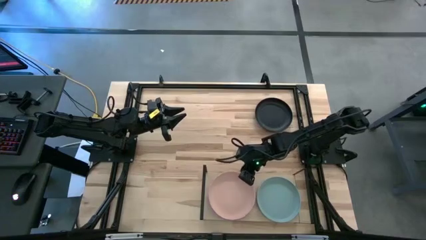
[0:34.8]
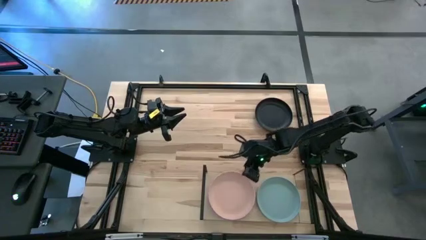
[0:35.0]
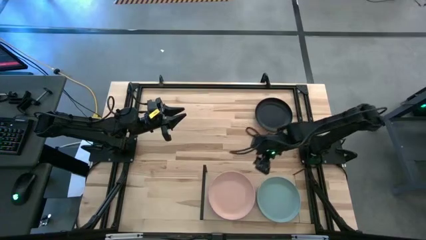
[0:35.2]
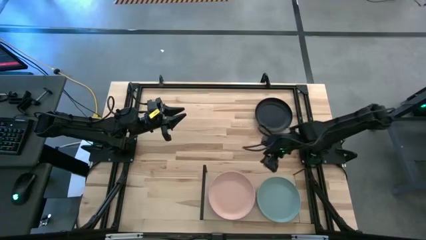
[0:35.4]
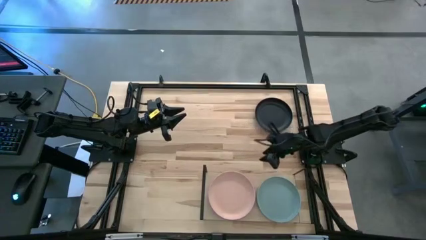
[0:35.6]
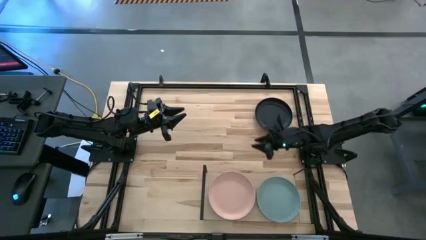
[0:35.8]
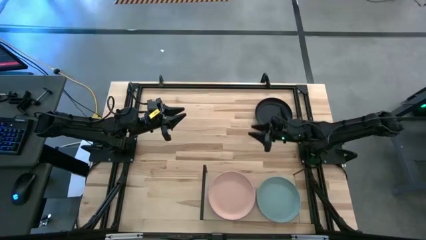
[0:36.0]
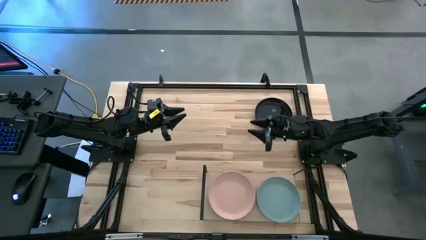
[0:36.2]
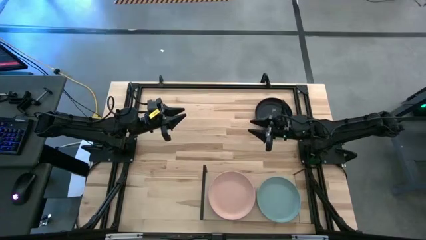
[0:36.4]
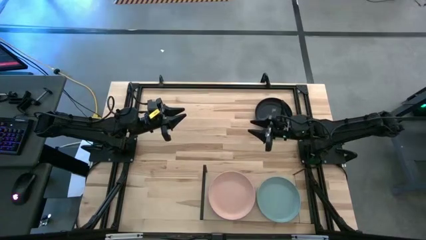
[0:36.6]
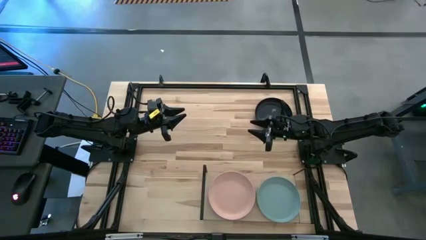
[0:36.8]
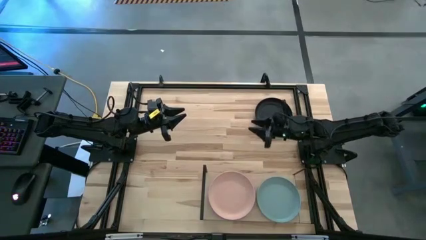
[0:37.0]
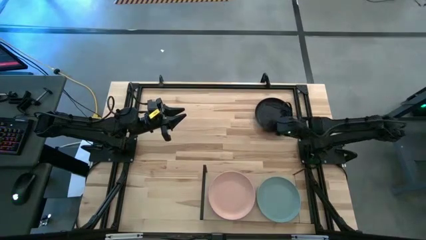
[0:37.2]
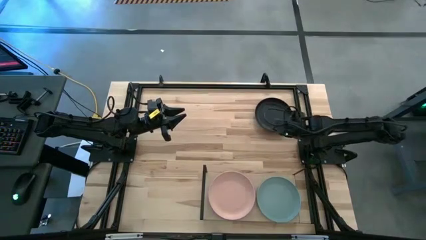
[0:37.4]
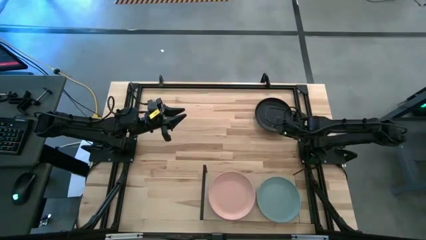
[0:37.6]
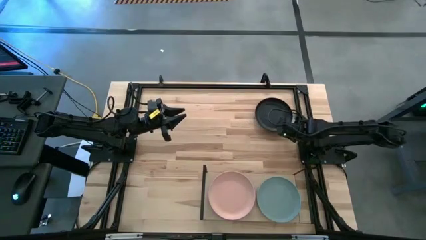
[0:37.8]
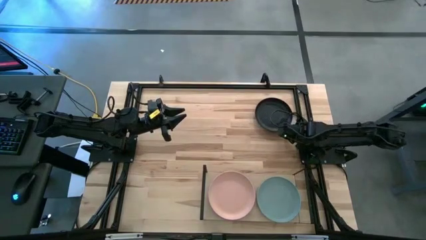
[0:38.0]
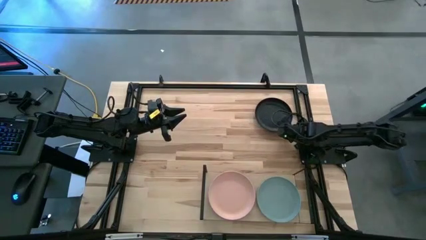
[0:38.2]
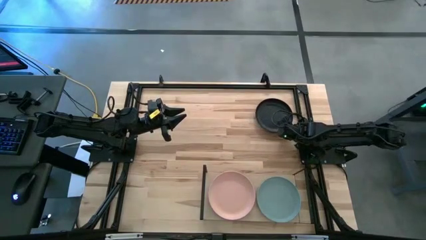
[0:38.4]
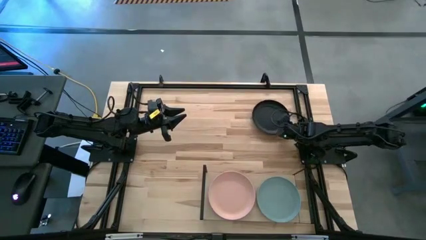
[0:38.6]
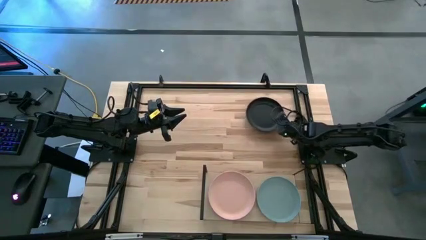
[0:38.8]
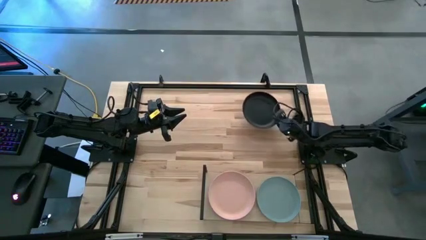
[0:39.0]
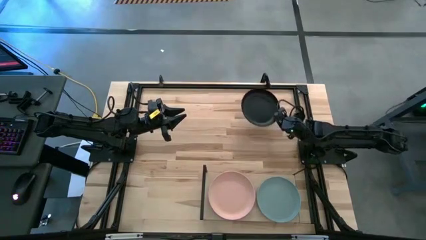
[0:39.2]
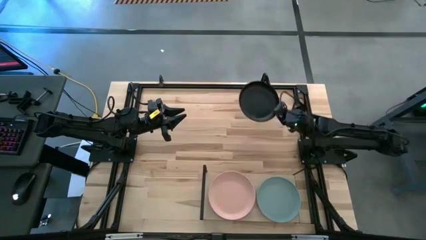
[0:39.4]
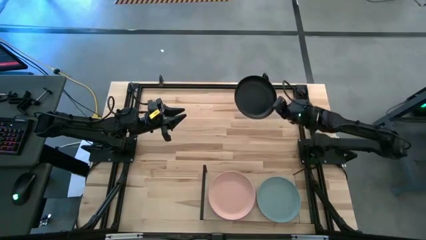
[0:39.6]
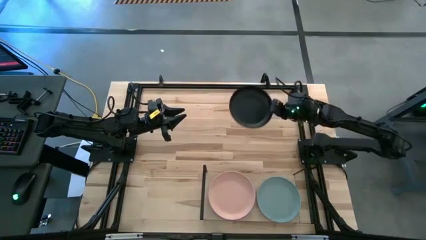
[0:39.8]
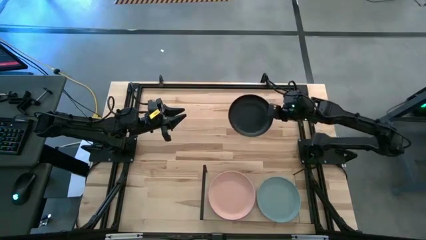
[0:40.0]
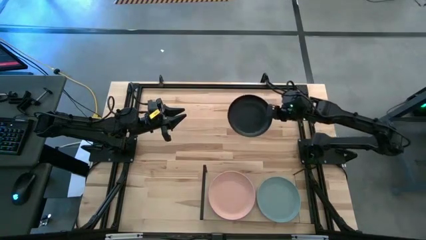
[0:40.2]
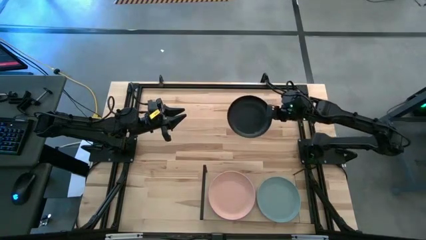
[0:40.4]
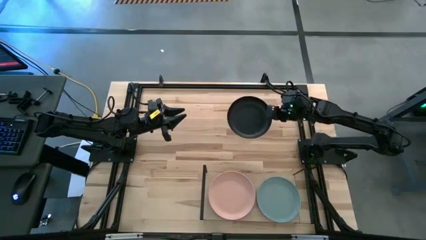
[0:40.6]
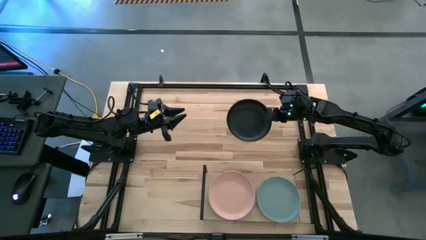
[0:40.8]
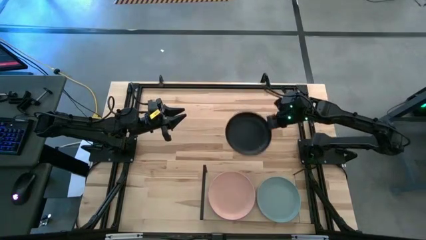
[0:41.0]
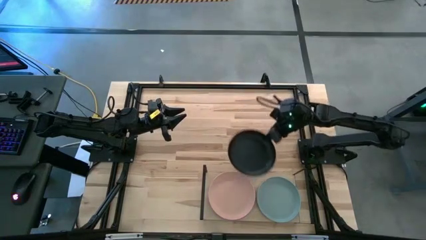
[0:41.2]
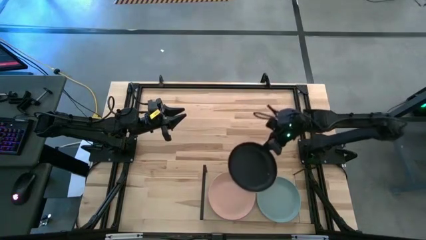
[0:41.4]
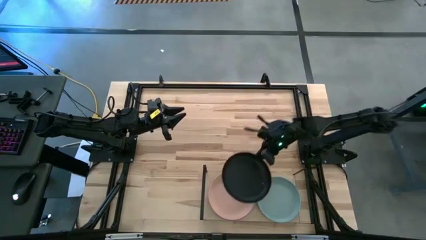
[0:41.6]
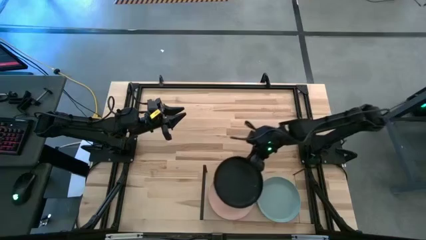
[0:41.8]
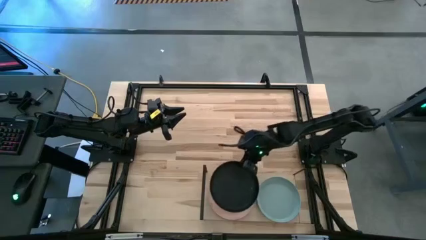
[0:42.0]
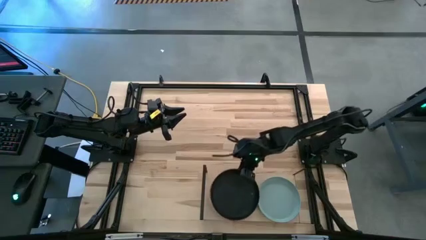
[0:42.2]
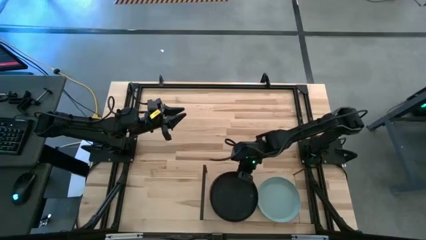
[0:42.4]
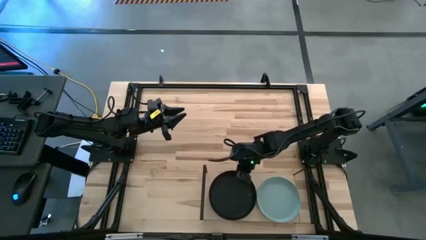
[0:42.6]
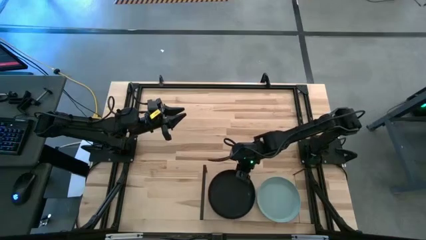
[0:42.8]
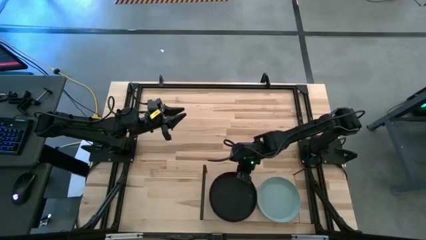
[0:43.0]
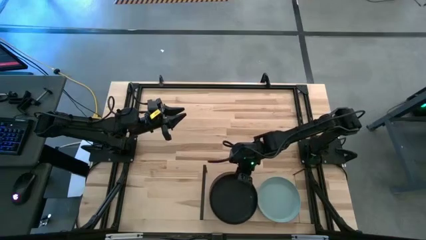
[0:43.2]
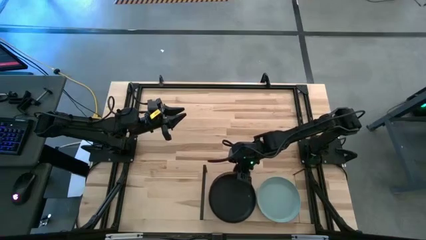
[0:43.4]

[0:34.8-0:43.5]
Task: Place and stack plates onto a shelf
Stack the black plate on the orange plate on the shelf

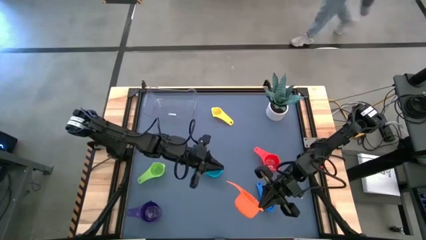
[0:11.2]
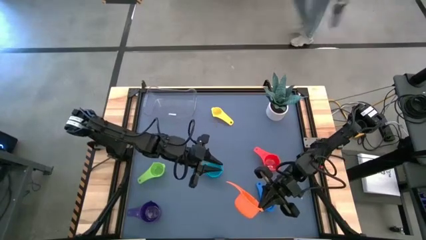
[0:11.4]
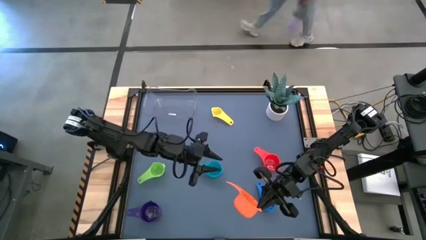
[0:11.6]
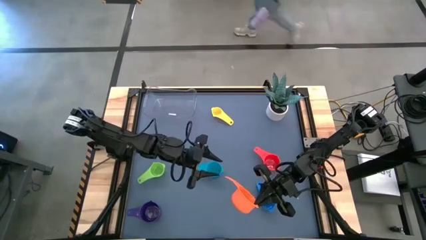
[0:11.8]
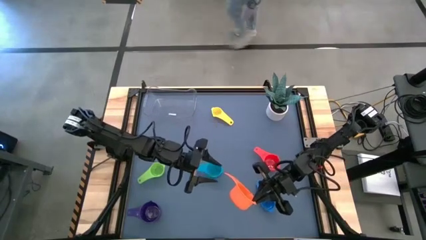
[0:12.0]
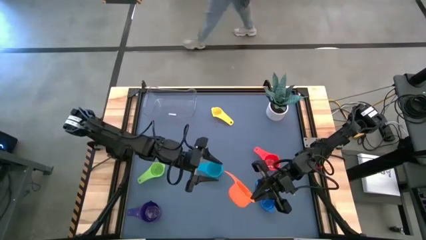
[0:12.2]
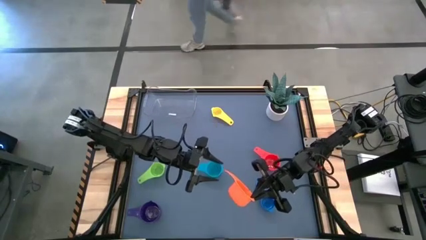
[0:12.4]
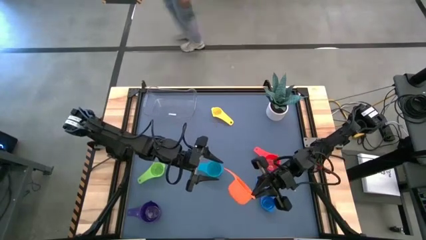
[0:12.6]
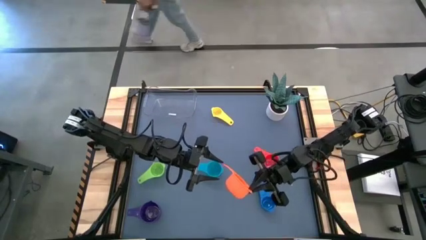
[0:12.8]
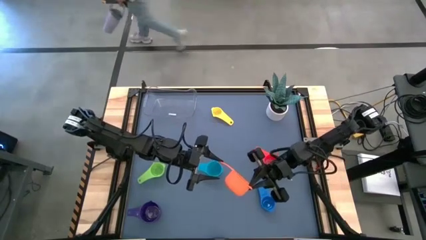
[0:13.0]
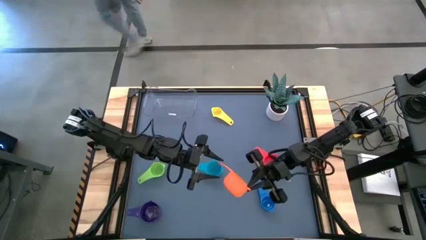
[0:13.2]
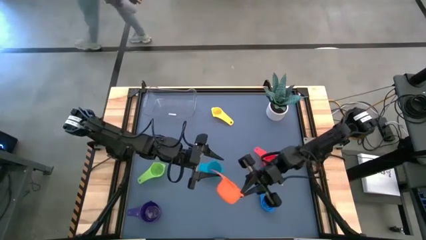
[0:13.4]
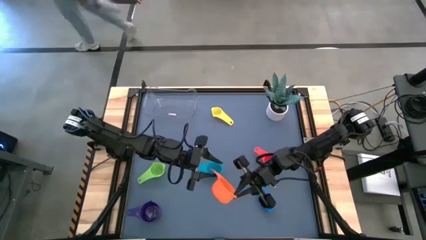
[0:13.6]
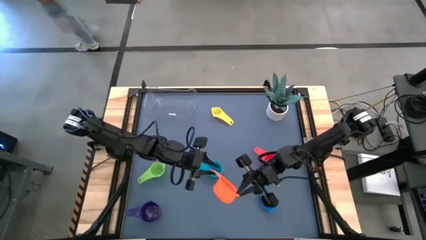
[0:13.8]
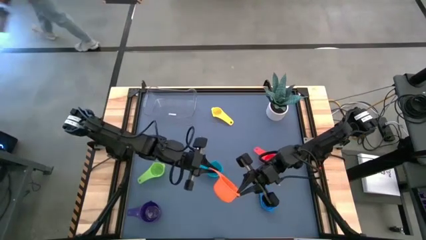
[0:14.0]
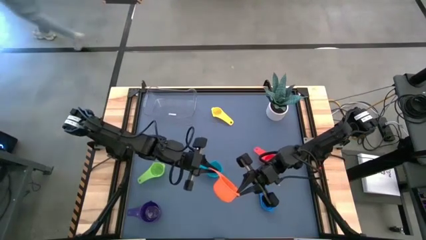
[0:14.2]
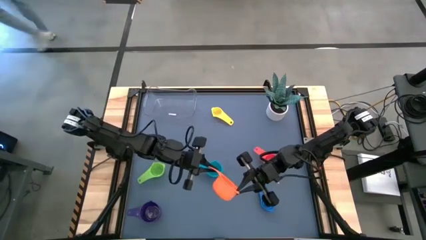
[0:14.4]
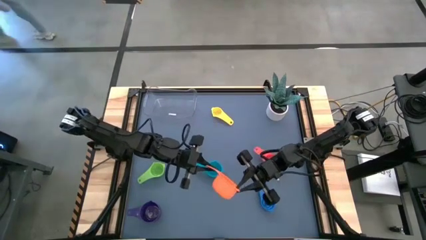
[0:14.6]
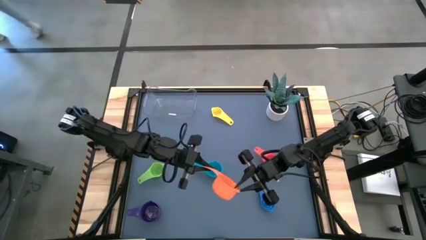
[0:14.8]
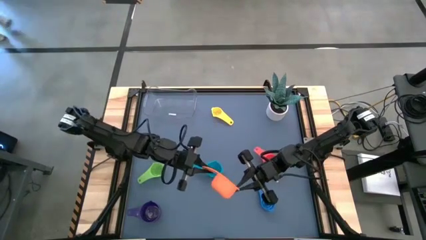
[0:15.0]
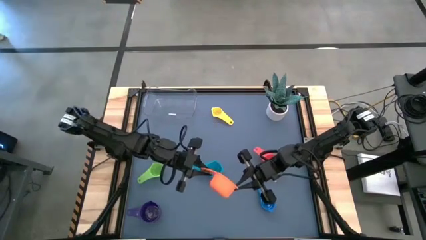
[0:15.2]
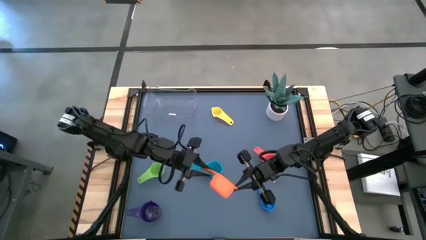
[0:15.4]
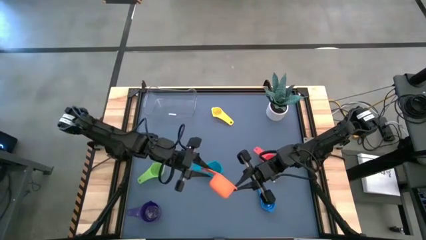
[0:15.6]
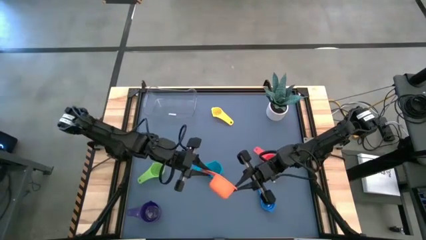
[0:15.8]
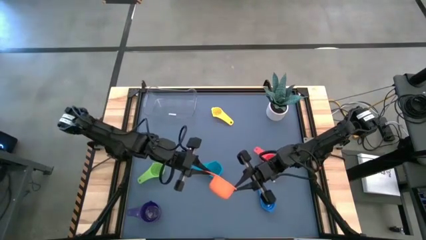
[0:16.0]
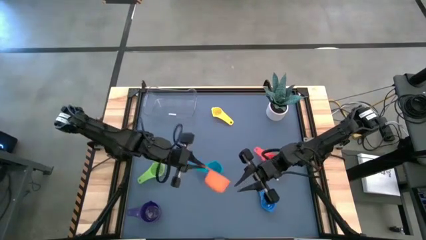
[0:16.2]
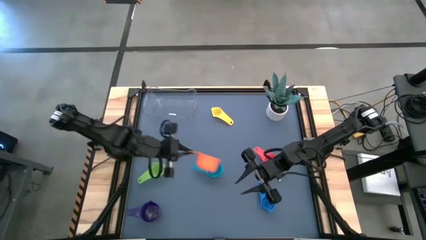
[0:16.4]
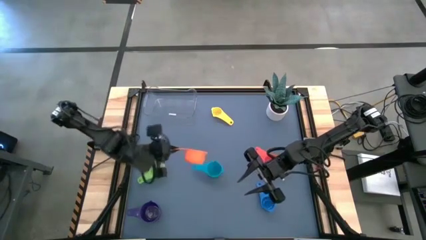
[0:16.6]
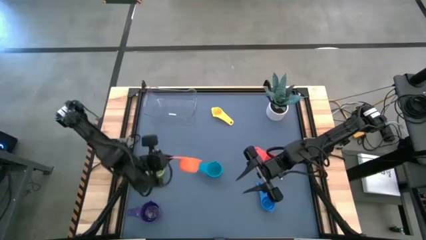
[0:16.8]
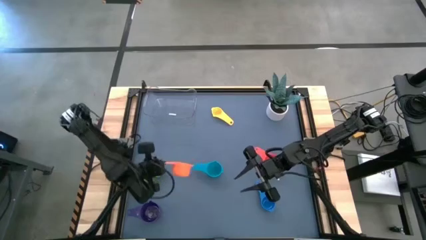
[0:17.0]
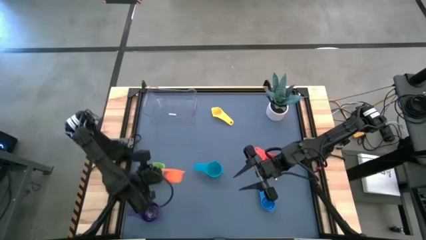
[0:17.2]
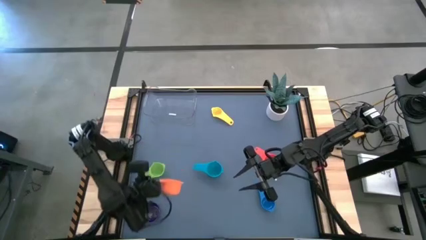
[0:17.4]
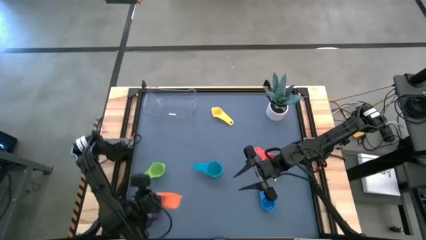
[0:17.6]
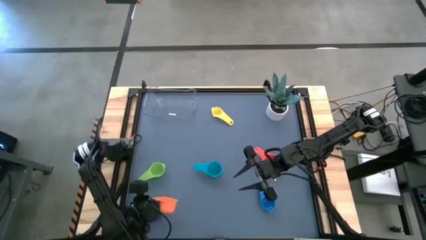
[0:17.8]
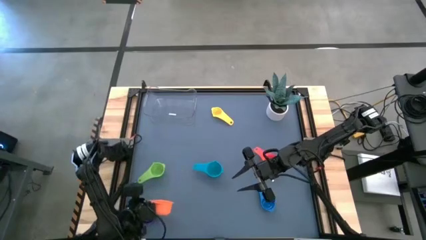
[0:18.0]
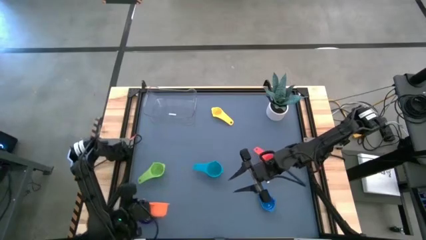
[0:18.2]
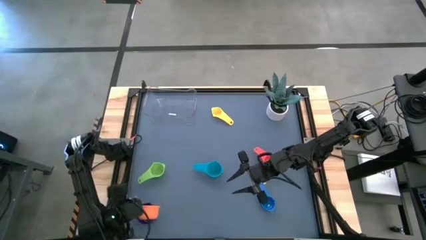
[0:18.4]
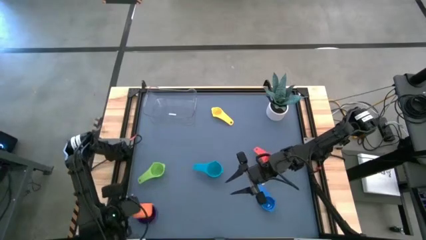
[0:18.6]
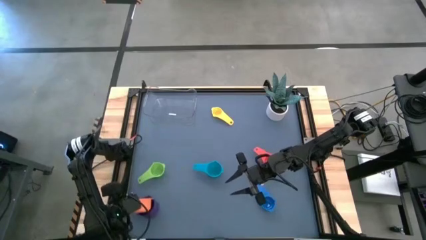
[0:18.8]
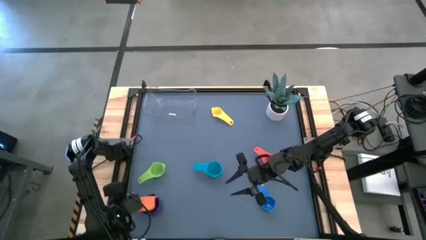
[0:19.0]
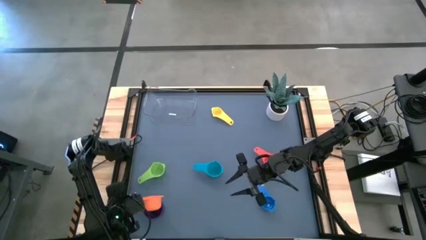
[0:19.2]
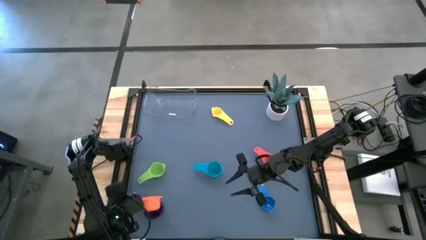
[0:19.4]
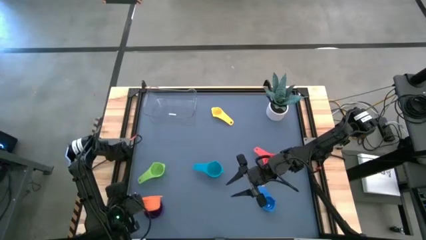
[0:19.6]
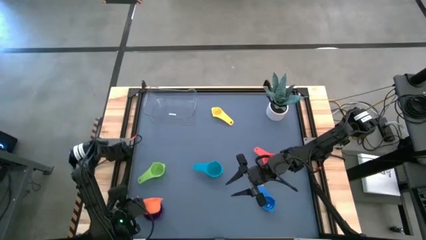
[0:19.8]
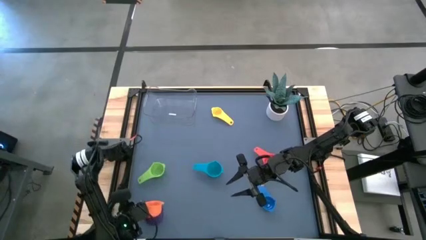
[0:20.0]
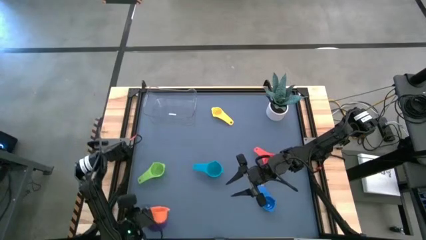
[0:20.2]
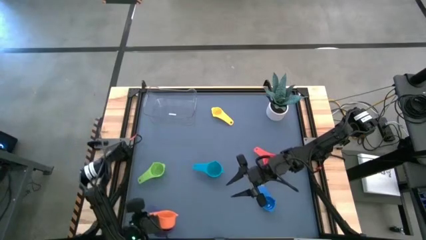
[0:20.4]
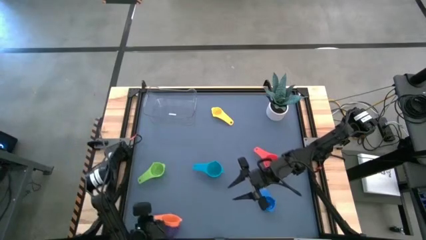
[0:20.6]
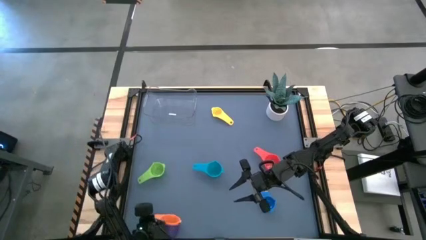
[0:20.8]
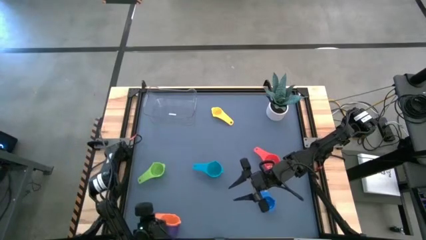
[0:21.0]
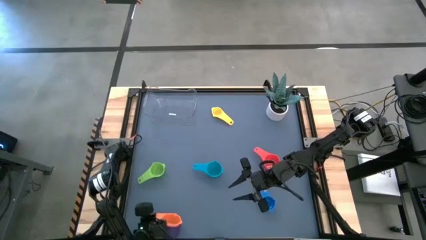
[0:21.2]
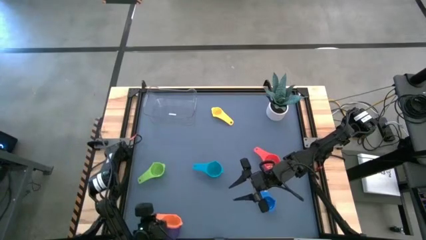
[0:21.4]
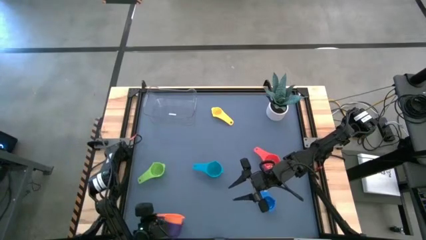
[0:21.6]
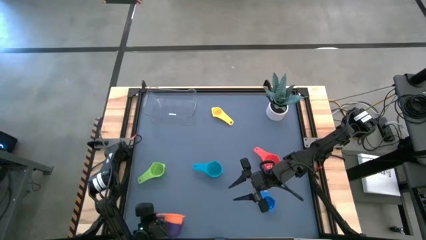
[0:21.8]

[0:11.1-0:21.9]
Task: Nest measuring cups in basket
Stack the orange measuring cup on top of the violet measuring cup
